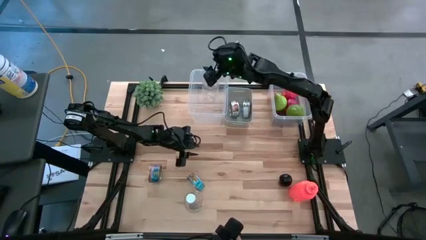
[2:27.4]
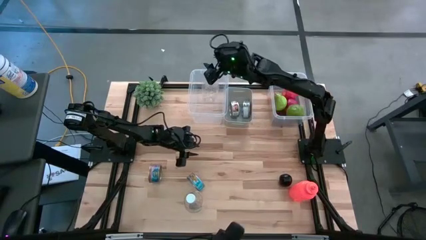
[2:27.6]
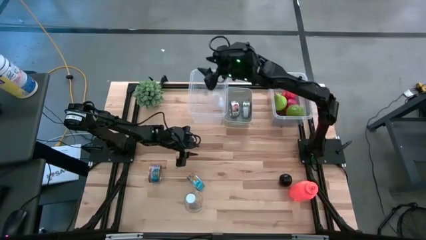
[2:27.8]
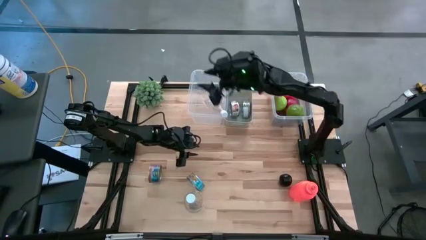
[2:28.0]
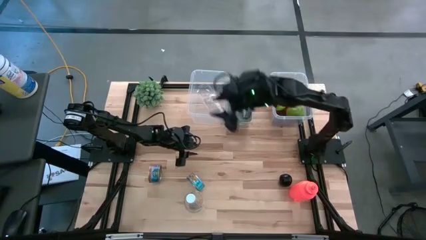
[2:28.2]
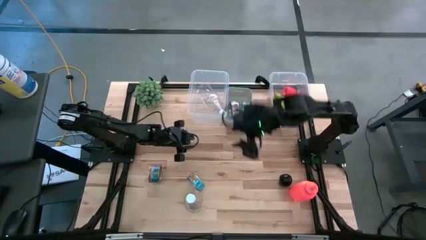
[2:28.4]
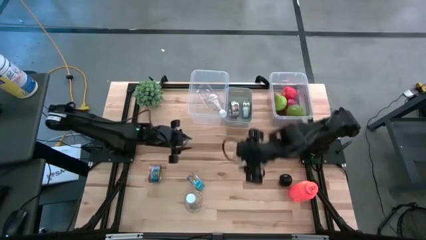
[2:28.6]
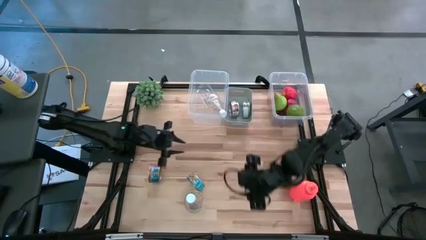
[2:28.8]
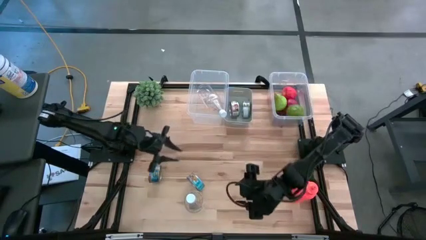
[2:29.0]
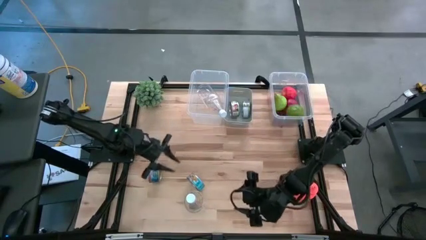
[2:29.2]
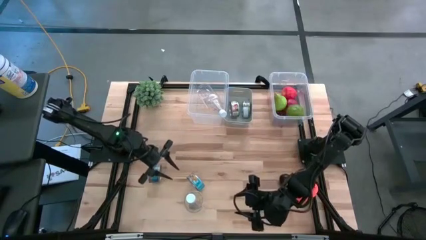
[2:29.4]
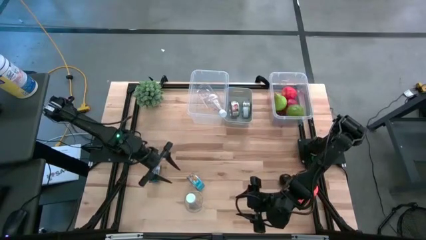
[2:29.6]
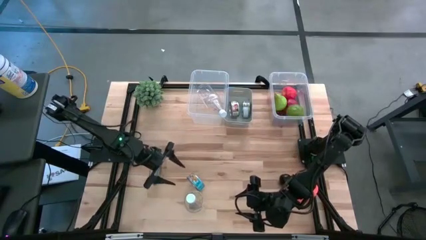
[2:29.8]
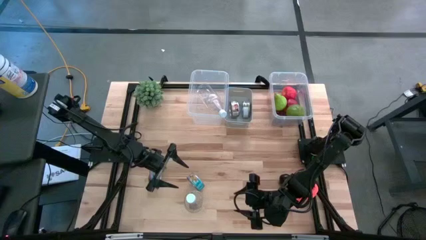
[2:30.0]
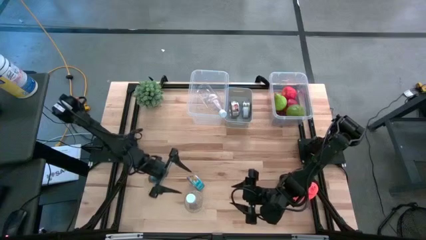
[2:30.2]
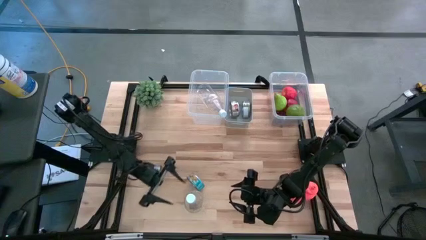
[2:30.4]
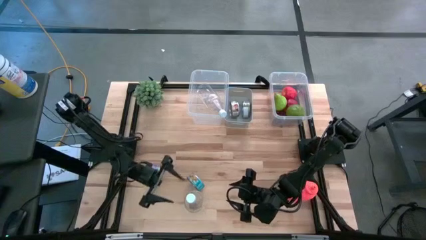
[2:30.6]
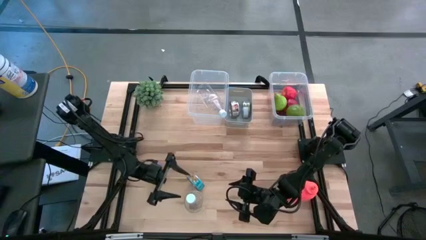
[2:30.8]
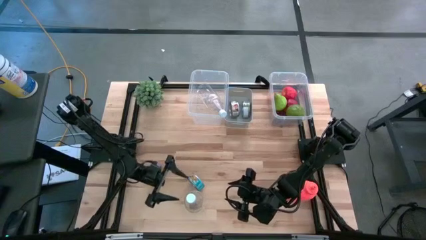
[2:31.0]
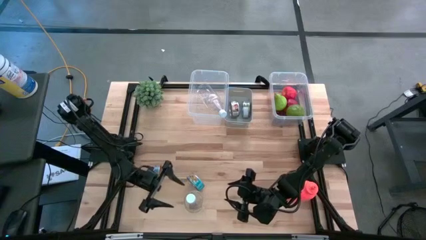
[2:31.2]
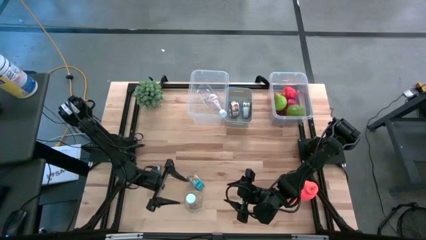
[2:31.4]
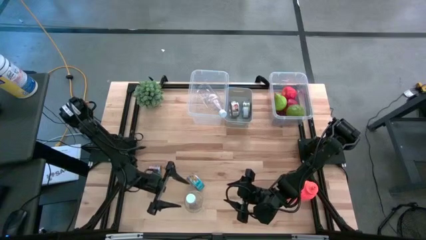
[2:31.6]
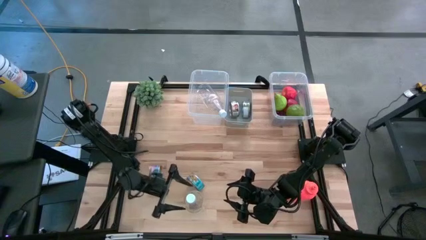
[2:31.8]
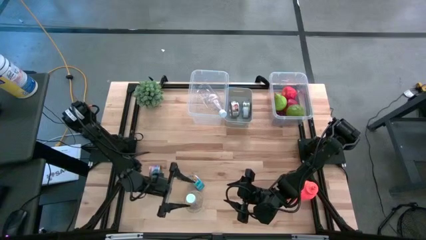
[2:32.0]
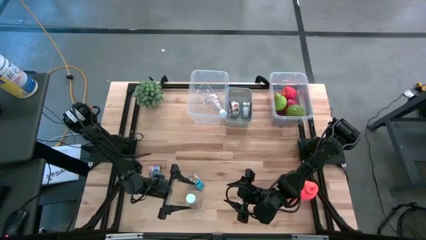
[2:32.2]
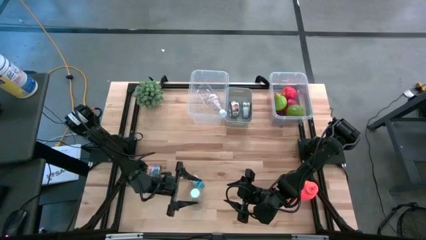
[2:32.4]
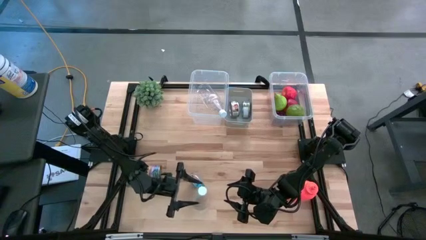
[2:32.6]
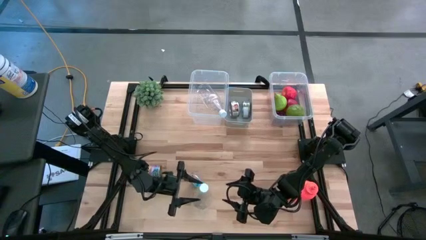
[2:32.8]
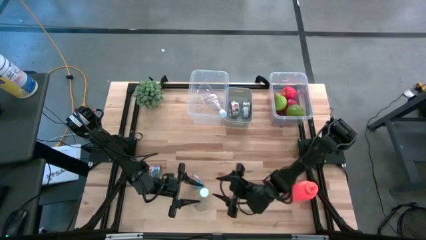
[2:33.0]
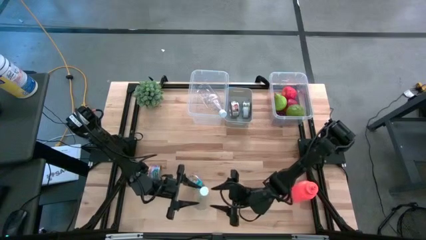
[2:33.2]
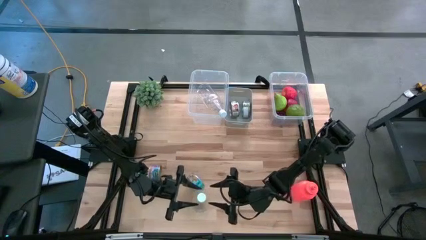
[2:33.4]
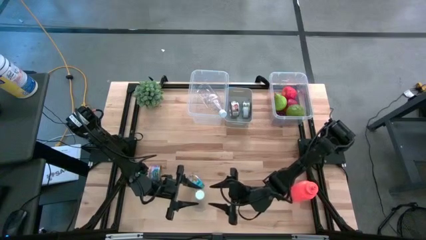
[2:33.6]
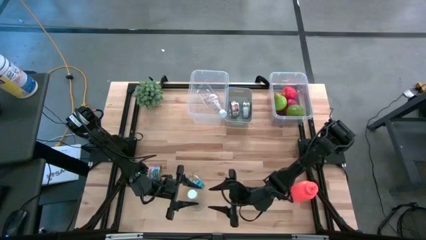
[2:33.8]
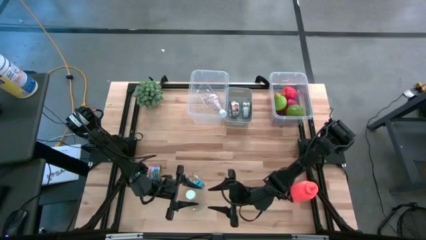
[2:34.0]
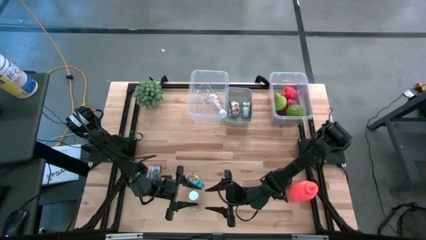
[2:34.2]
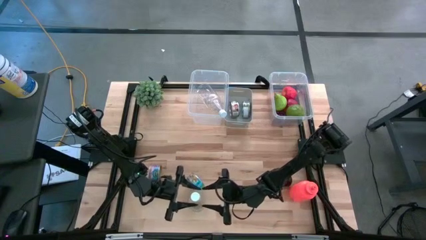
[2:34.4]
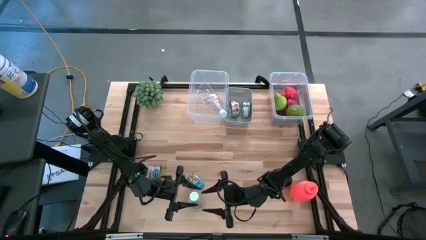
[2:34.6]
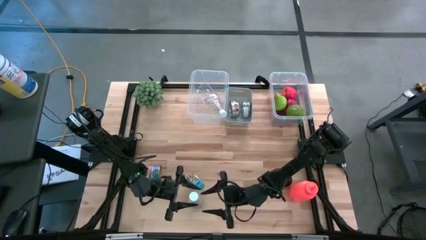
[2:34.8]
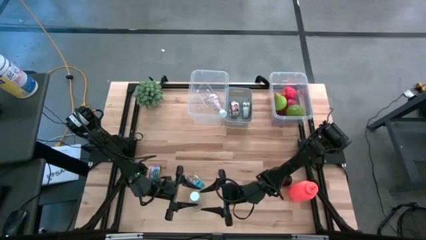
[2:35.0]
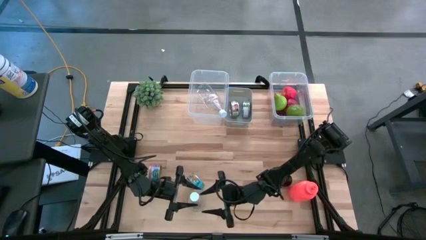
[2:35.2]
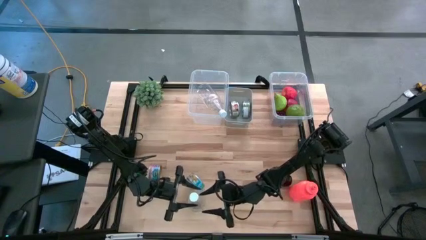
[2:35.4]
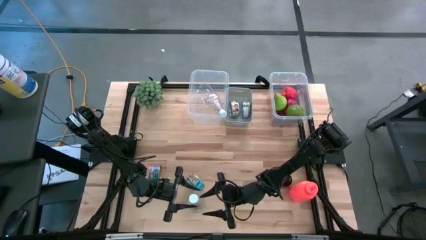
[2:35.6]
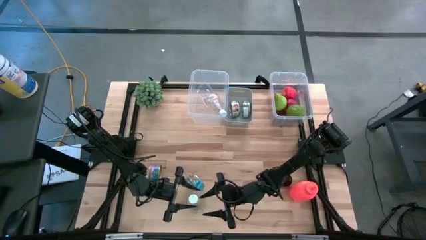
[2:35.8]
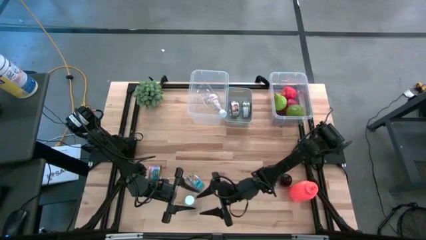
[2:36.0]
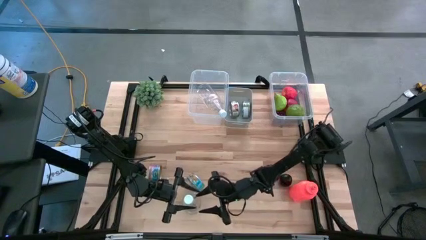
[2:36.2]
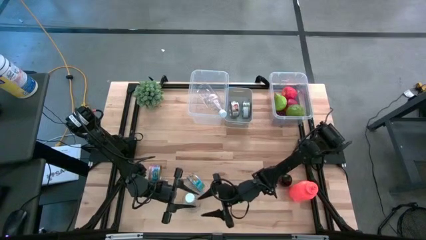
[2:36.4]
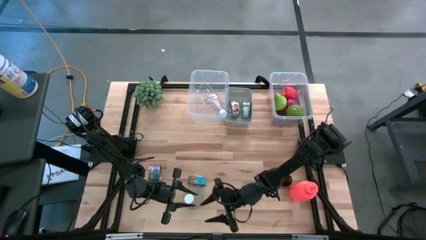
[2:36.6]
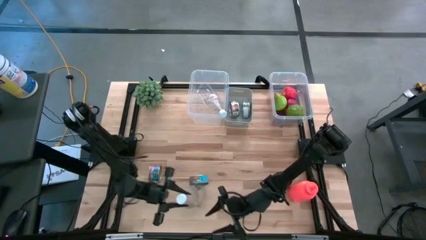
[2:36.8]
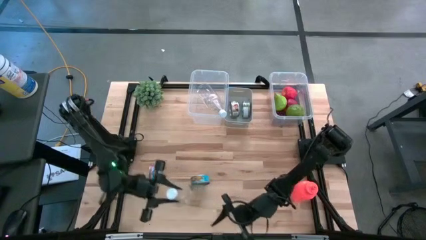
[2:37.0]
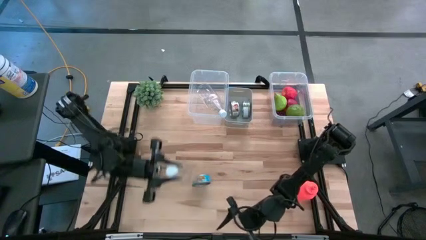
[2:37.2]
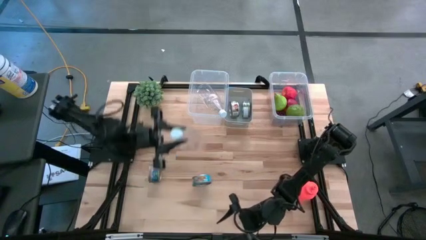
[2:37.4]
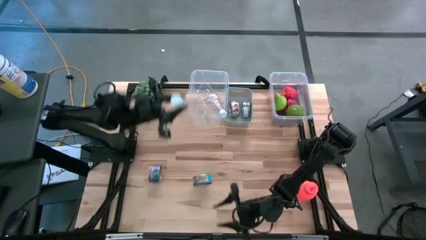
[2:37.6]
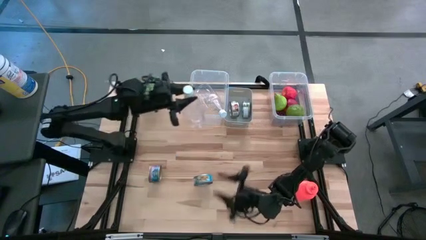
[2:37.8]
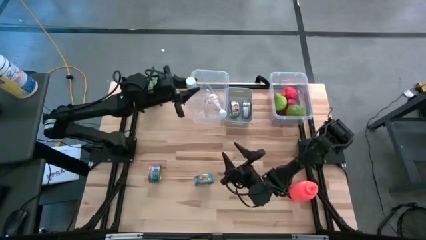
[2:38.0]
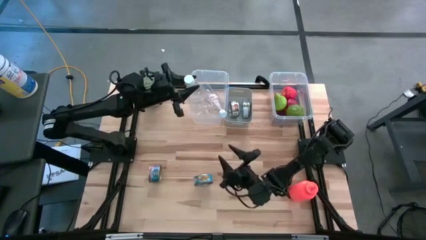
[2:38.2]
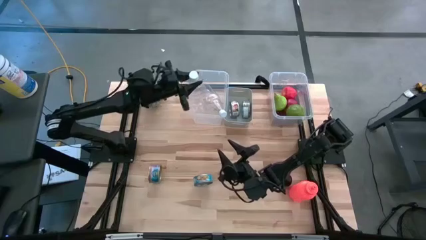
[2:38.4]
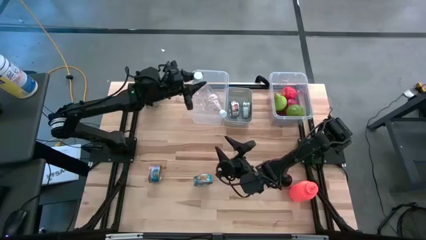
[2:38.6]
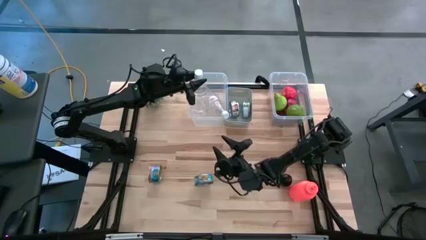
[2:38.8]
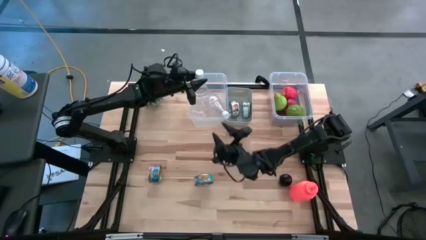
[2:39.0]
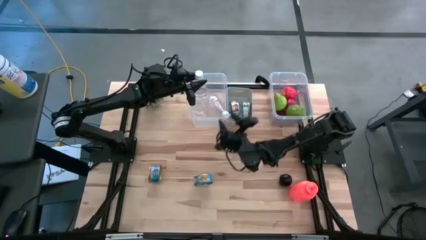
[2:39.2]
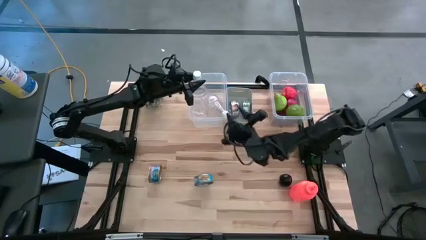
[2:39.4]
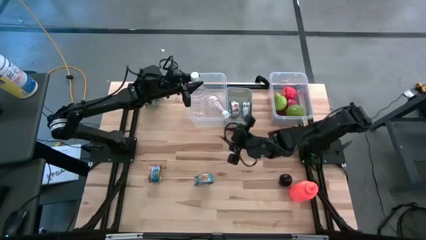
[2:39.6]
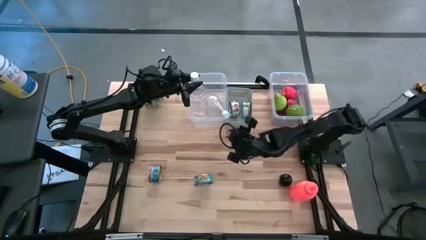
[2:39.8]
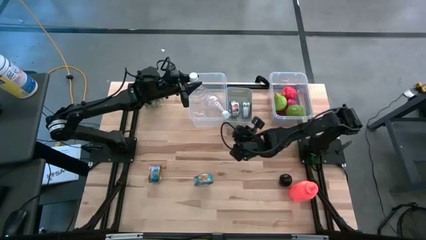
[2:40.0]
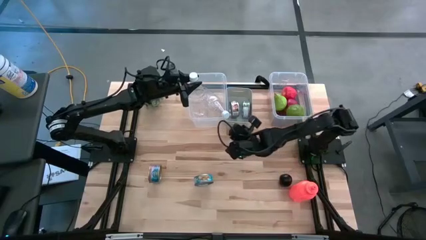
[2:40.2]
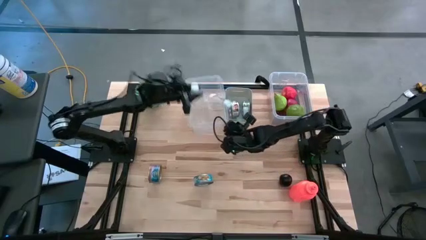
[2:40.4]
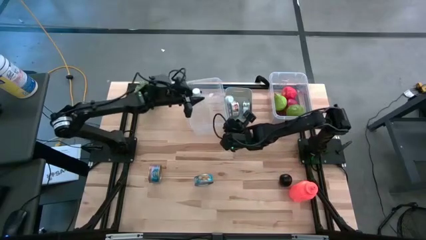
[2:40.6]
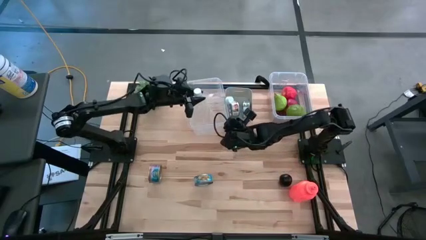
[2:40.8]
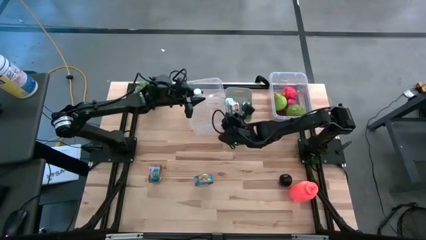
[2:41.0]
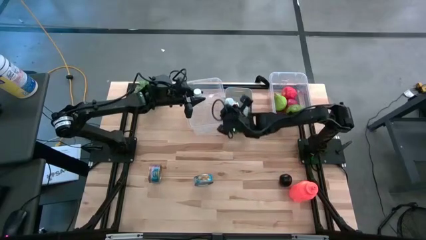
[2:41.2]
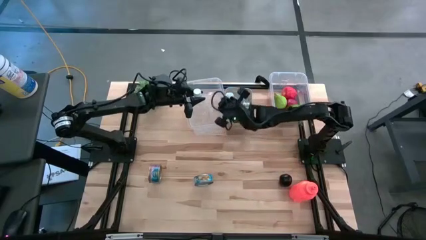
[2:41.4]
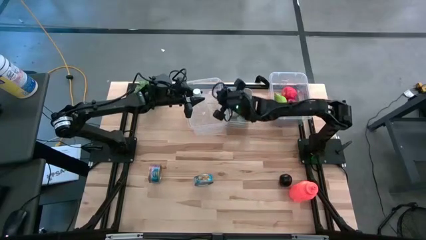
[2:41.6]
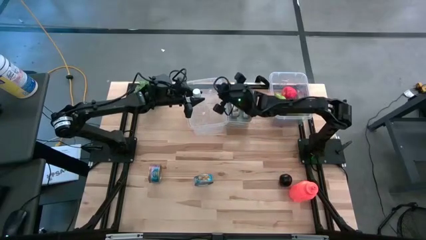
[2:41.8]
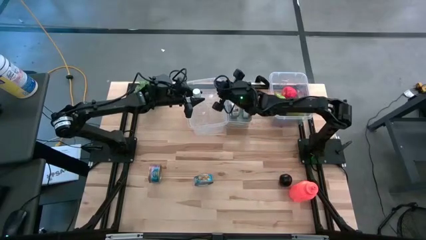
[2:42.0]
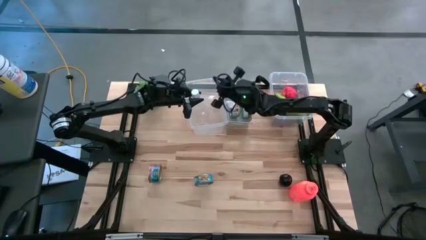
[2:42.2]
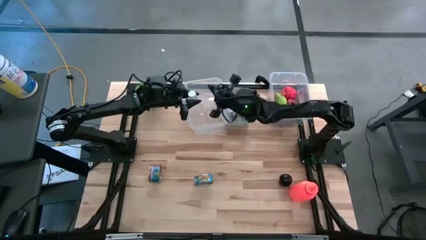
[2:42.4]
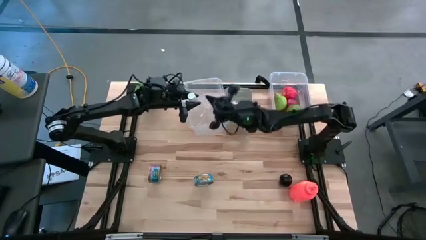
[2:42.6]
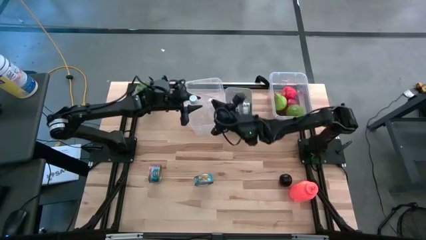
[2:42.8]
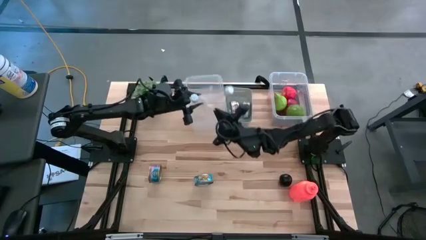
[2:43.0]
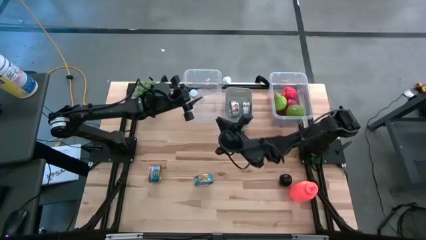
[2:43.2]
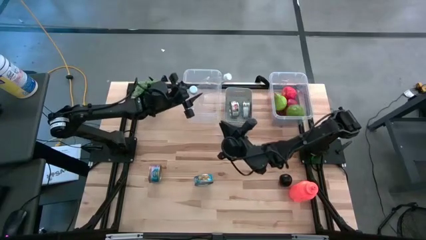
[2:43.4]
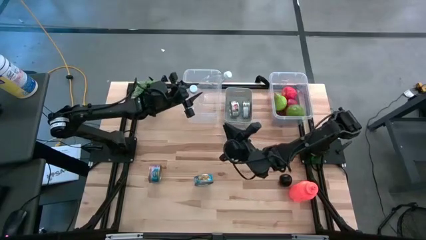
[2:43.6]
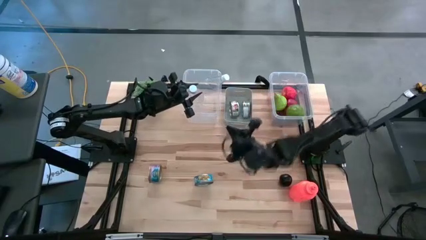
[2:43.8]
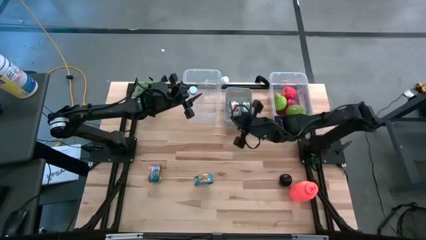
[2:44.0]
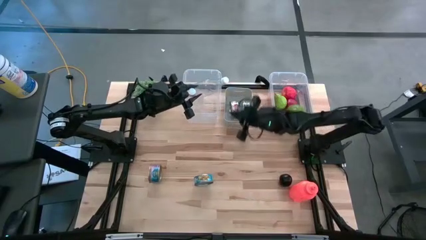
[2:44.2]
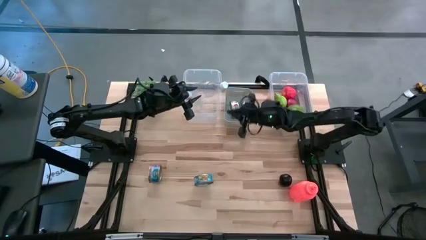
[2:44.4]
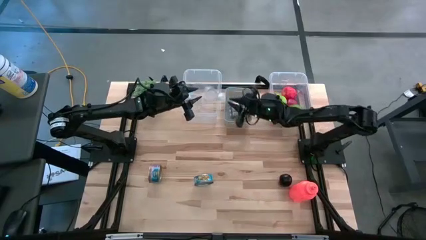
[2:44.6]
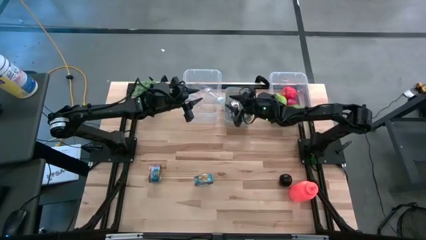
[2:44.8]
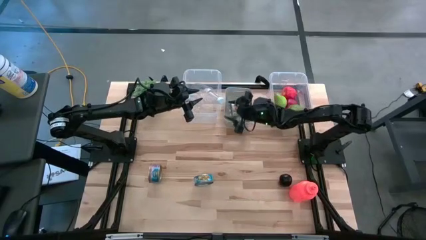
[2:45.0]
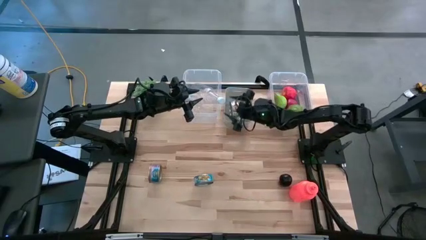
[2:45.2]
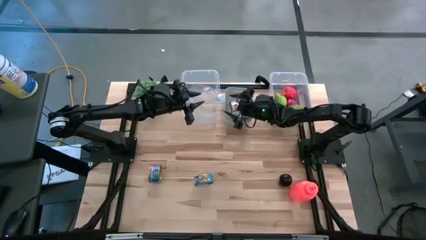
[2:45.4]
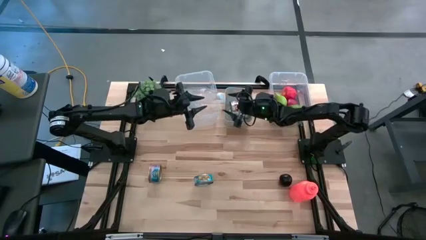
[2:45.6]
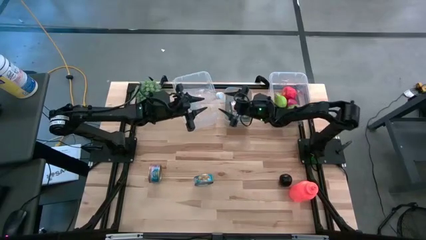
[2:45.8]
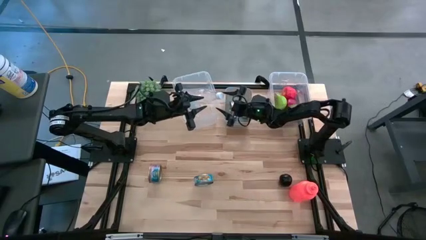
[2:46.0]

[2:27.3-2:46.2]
Task: Pick & Place Food Item
Put the transparent bottle into the left transparent bin
